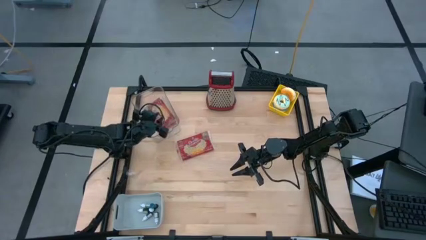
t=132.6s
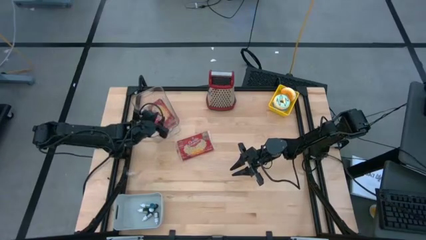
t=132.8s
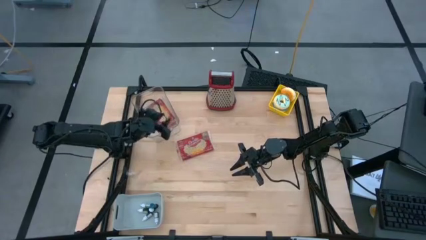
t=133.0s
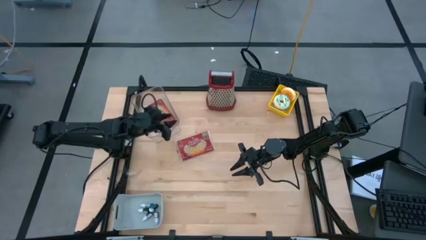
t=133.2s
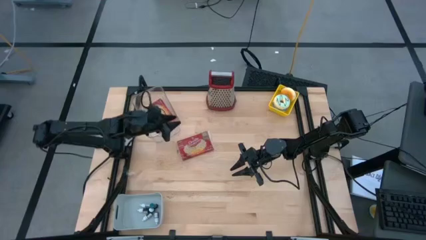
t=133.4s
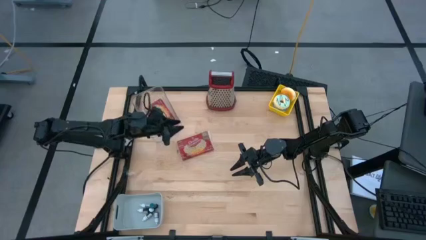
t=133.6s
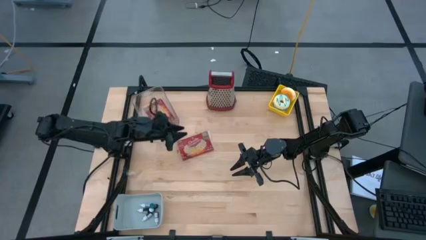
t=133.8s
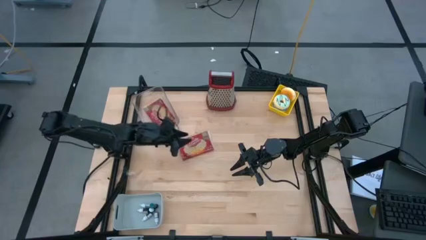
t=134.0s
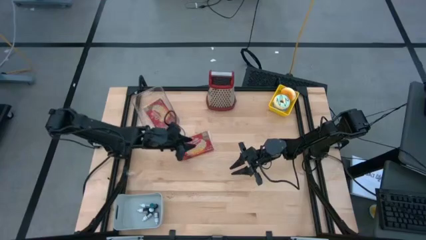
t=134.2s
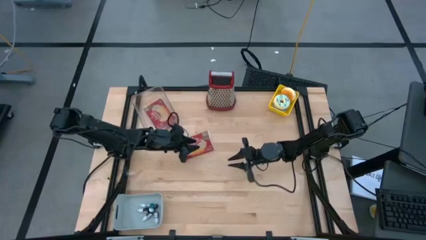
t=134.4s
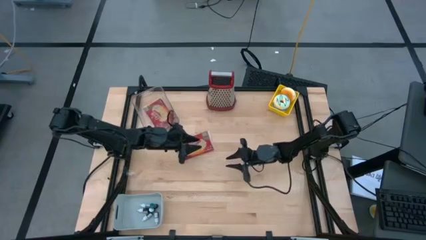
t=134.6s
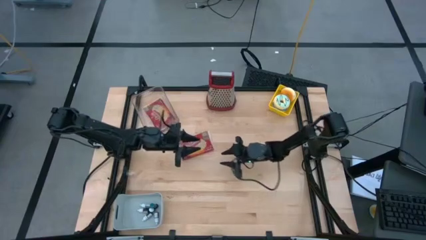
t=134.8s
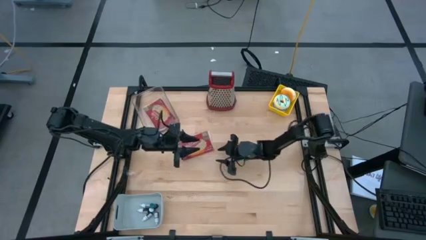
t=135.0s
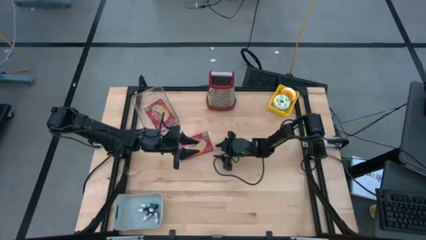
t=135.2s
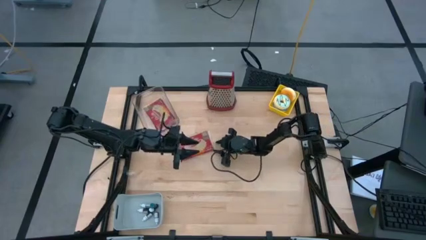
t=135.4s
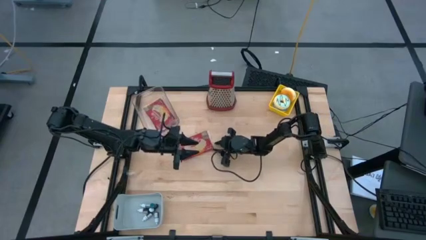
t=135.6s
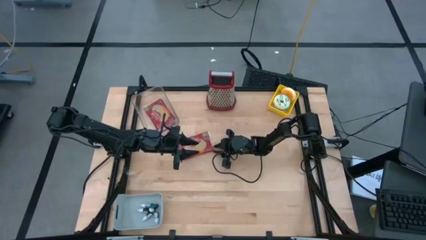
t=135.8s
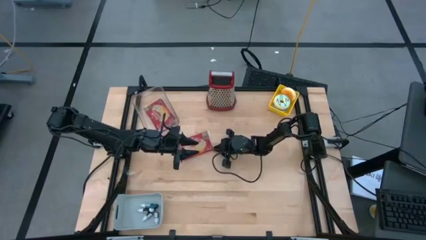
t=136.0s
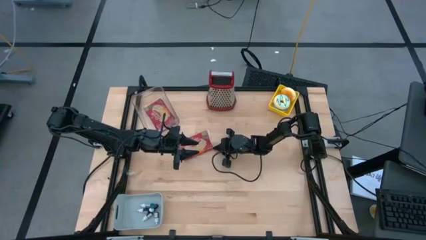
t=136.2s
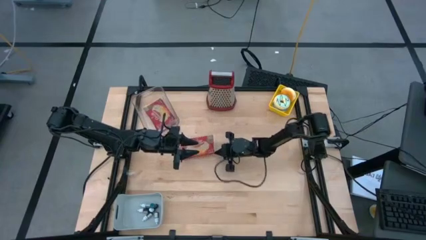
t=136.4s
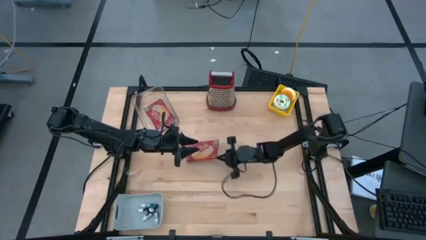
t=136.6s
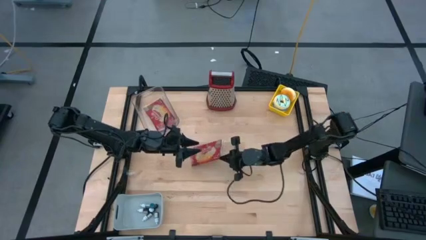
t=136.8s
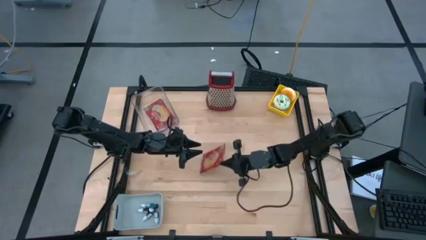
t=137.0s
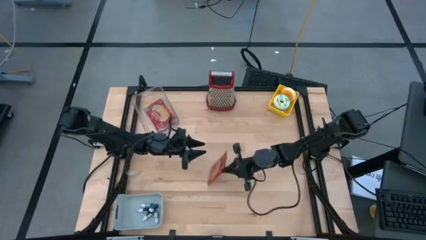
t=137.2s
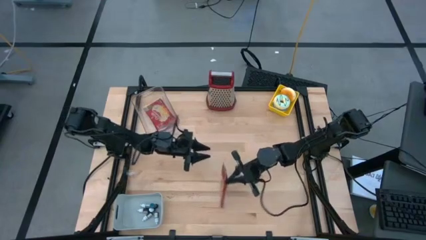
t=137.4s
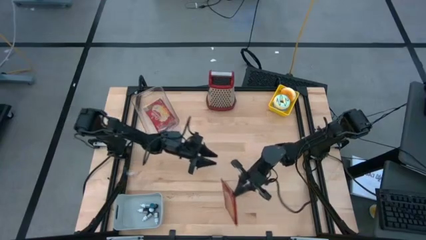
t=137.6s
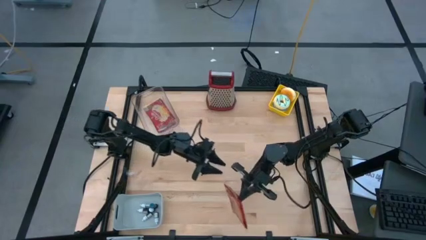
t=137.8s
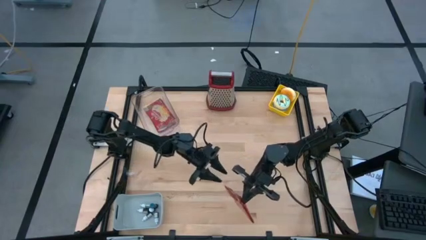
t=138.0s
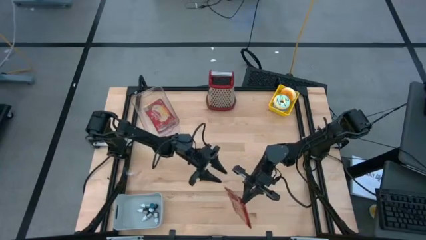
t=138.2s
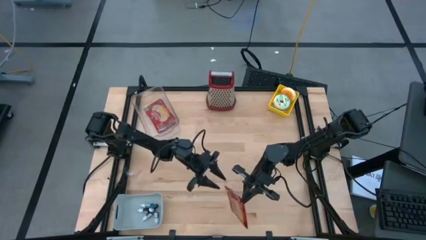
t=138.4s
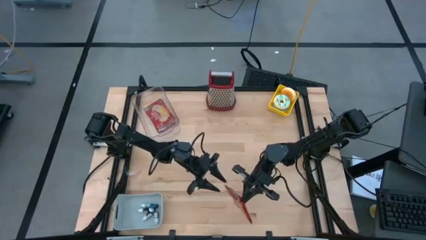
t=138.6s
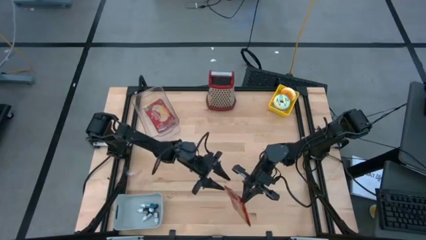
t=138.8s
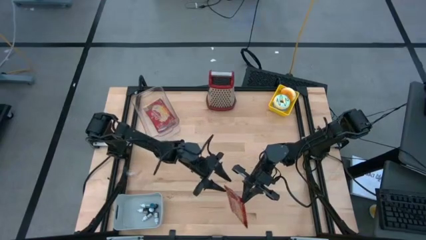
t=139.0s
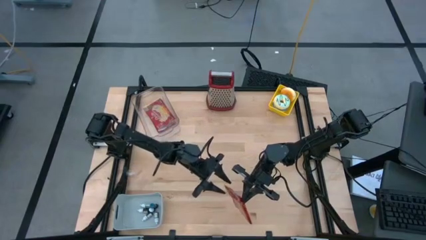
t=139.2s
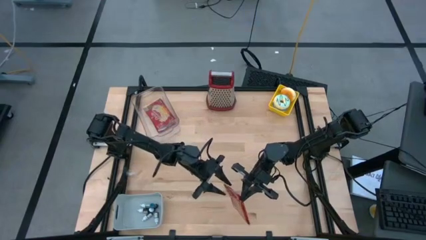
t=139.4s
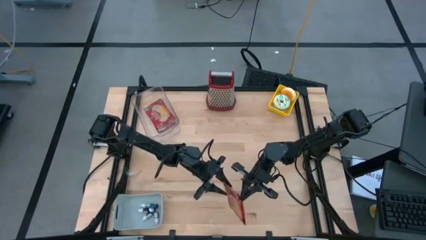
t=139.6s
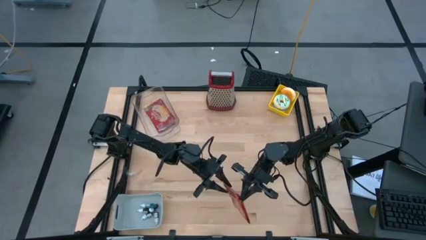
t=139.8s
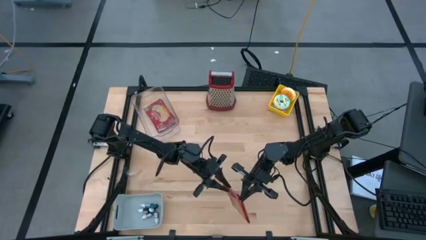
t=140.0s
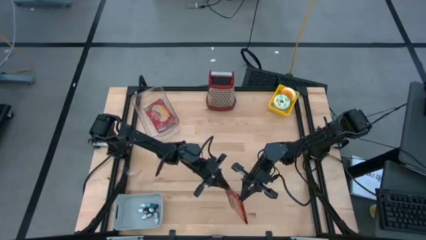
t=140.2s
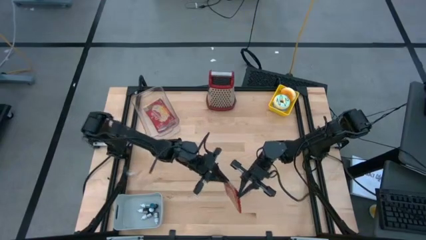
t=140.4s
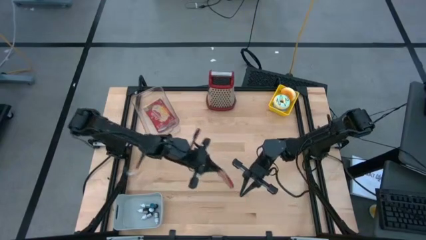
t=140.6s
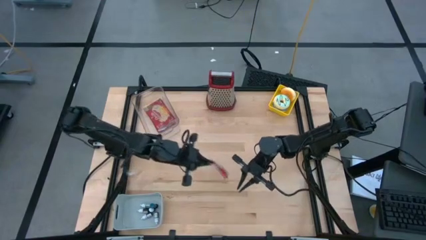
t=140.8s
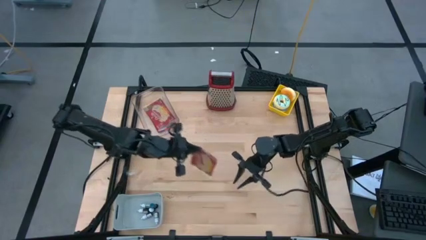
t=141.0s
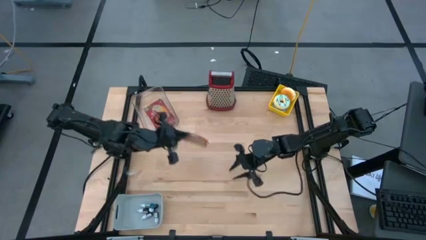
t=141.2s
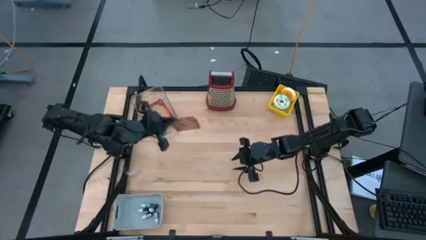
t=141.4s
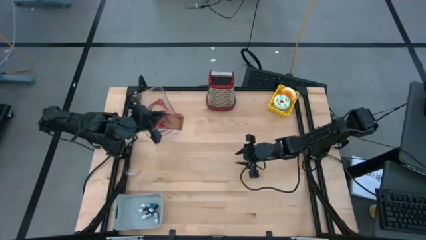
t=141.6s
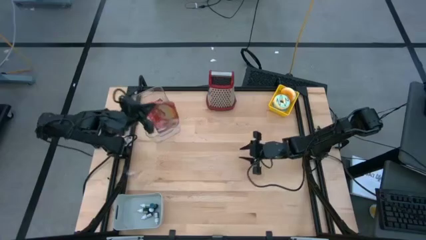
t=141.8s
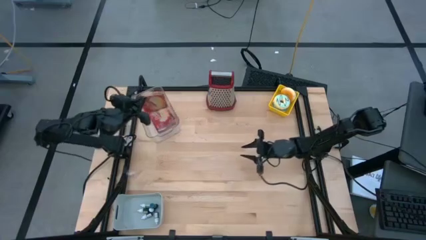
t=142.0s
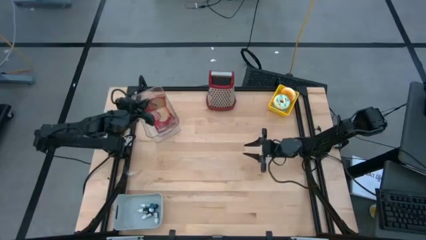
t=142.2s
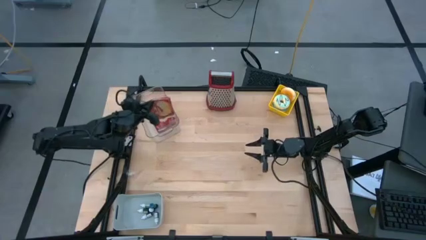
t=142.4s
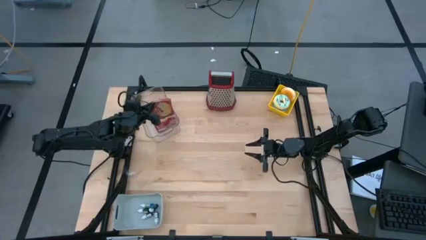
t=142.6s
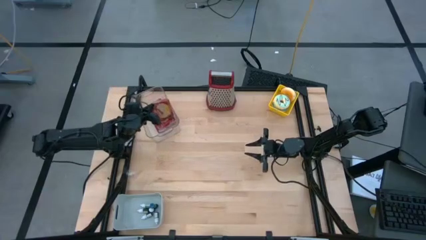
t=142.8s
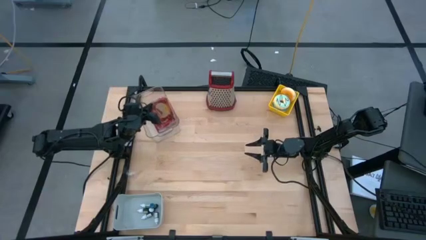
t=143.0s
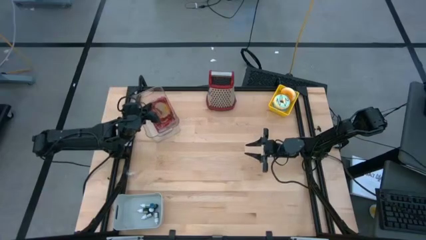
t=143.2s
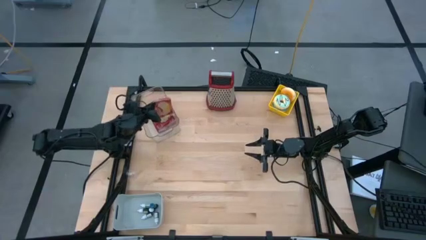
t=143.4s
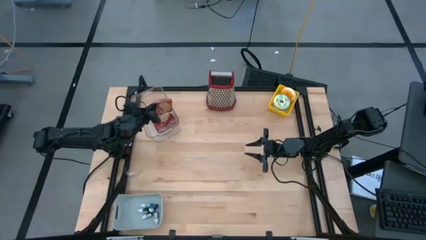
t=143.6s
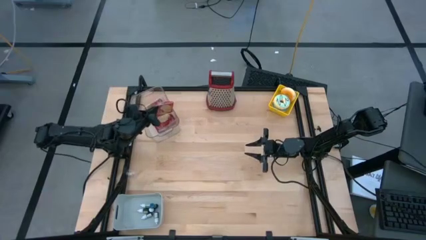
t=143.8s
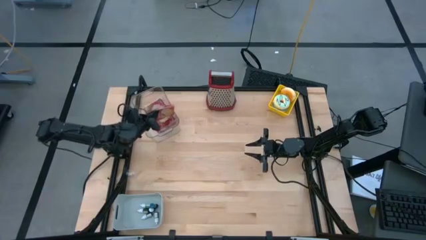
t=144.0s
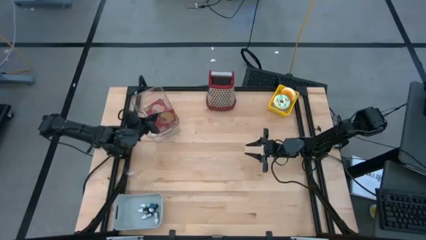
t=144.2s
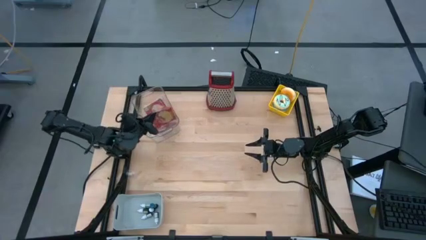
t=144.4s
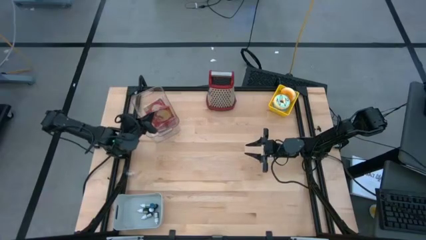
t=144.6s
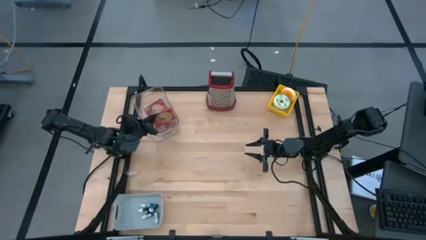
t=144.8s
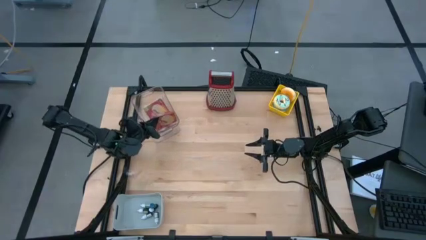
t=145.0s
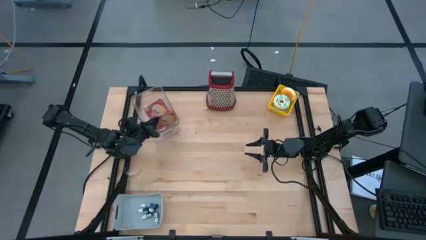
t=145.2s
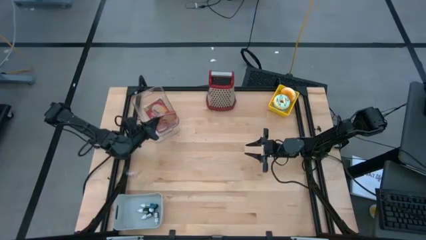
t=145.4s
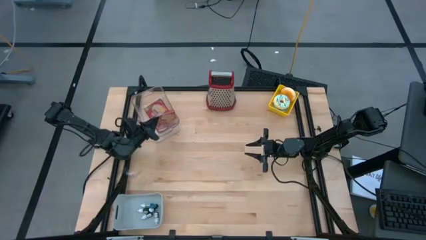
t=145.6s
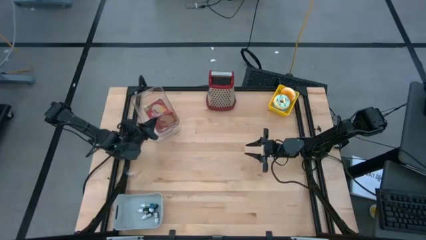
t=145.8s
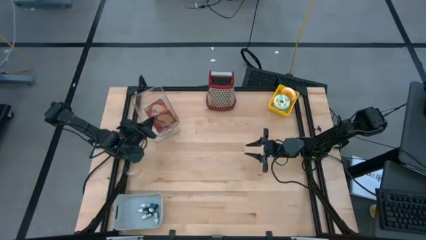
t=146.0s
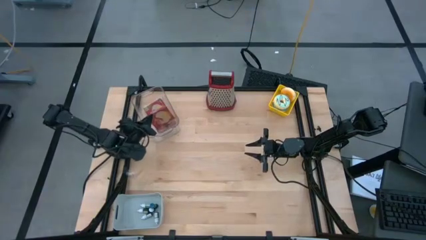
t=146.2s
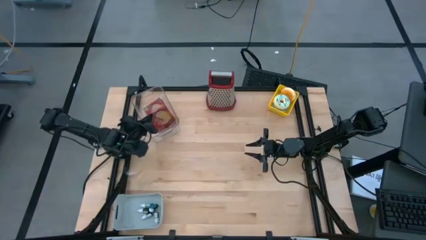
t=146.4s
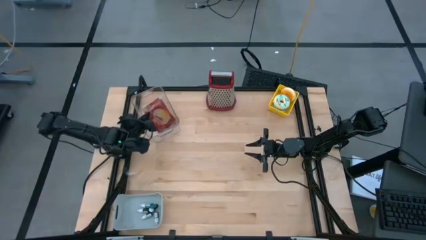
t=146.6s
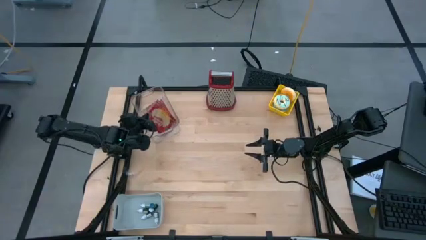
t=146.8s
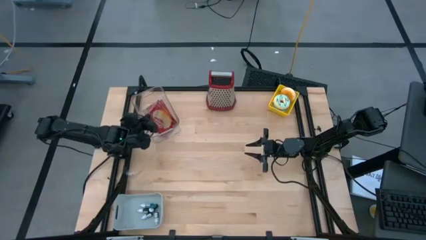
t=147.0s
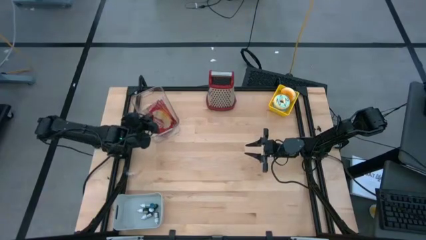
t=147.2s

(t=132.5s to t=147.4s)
Put the red popcorn bag into the transparent bin
